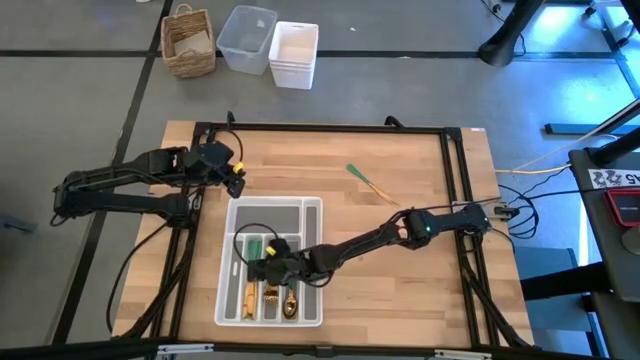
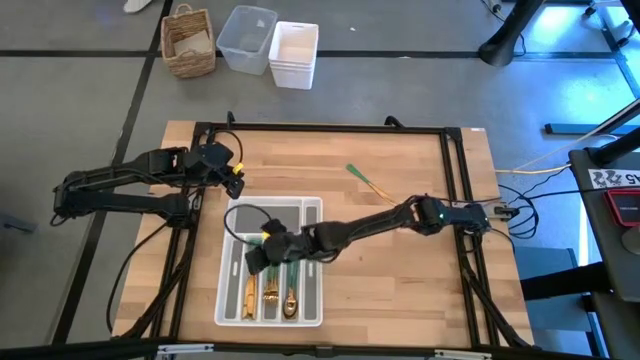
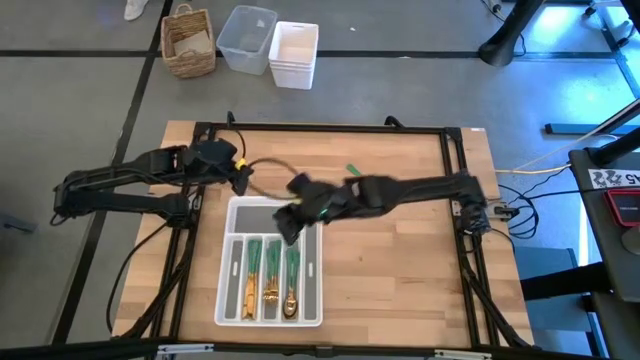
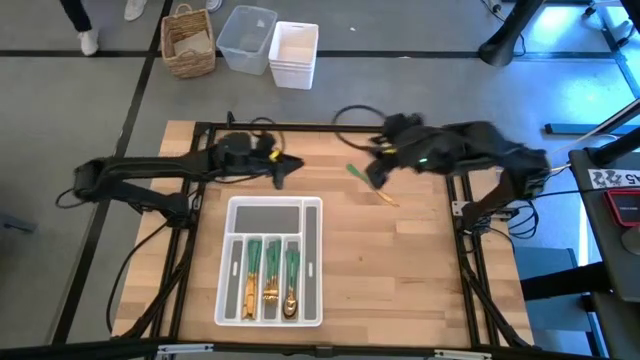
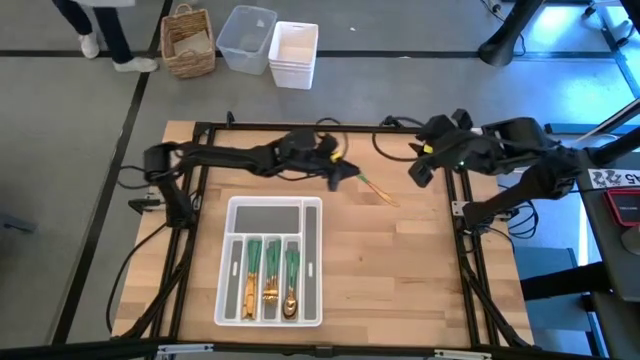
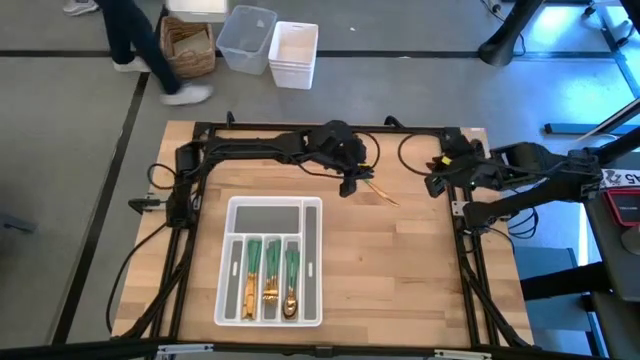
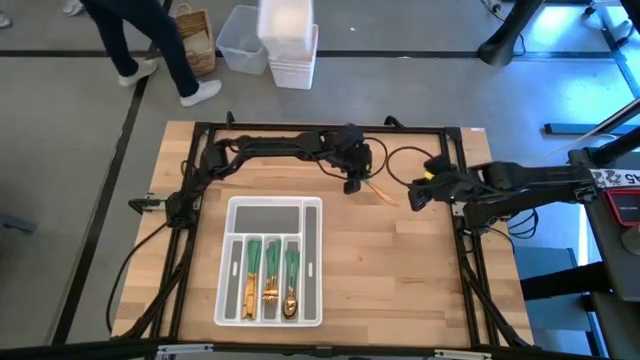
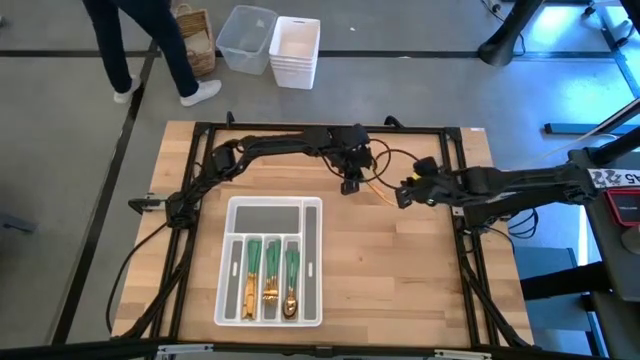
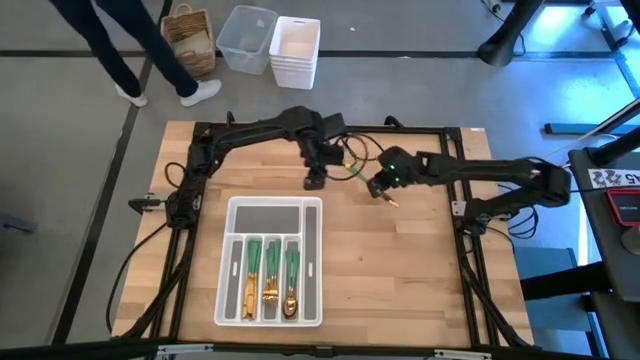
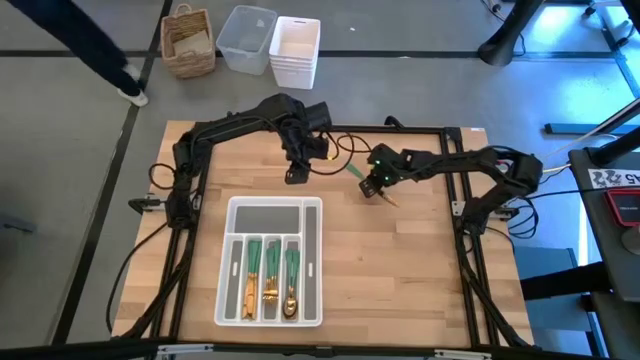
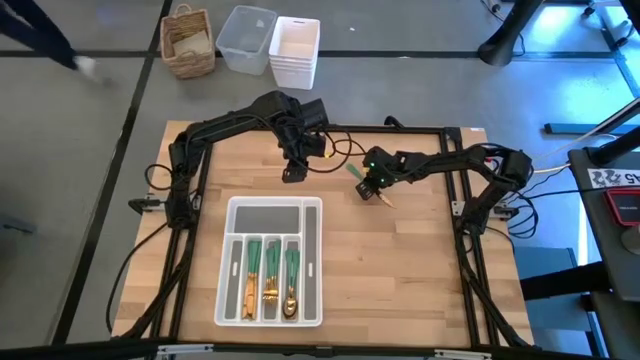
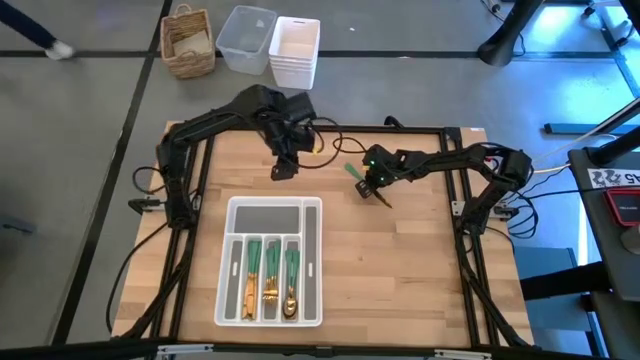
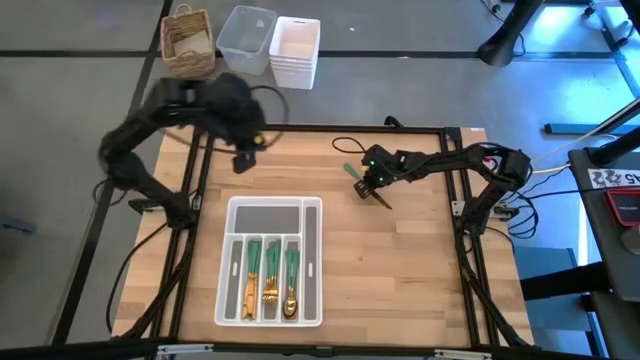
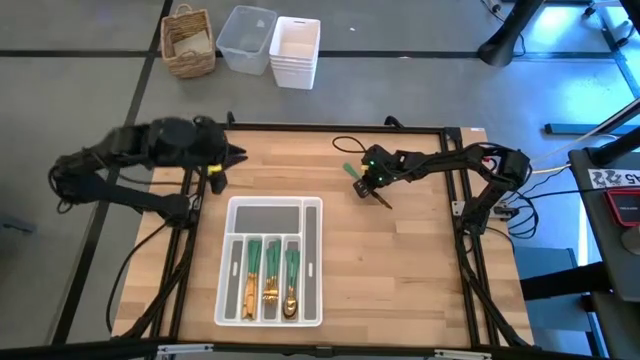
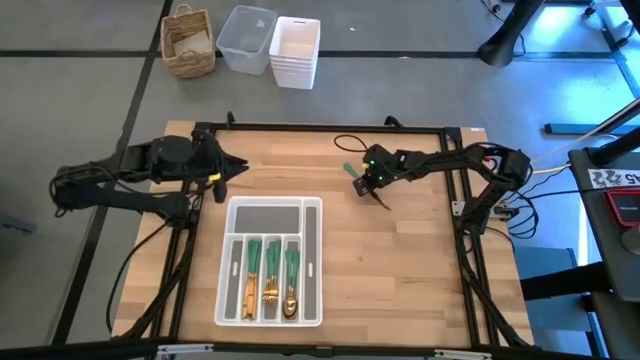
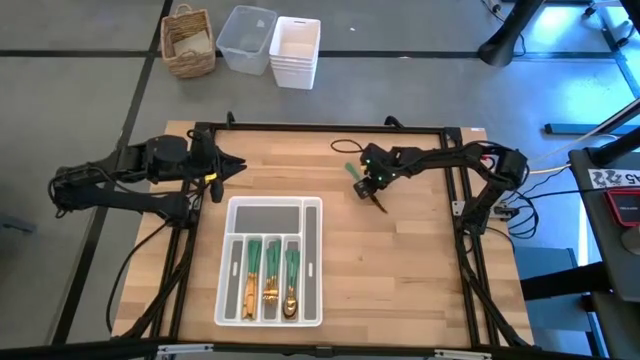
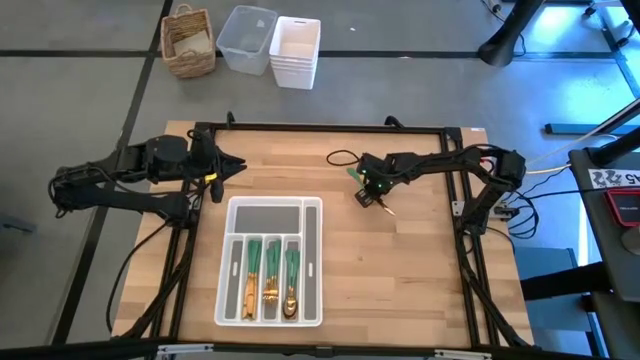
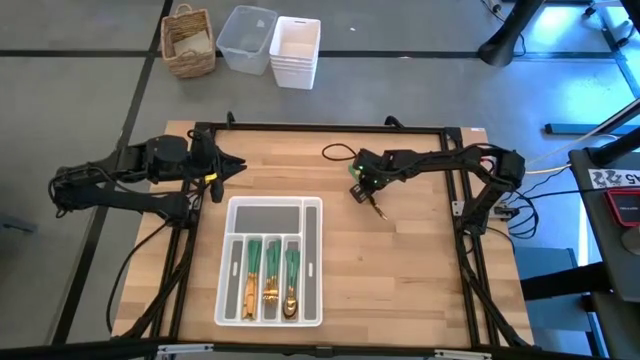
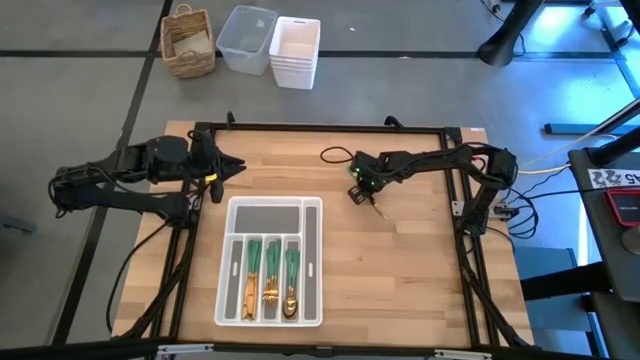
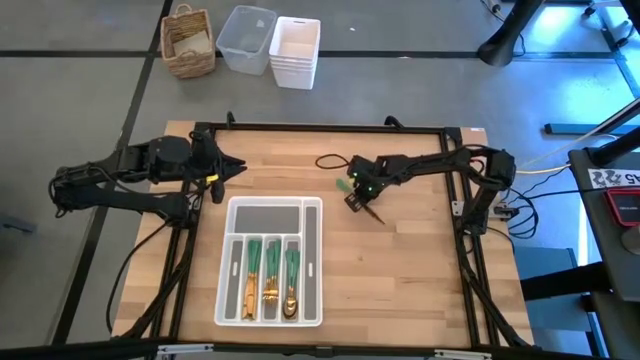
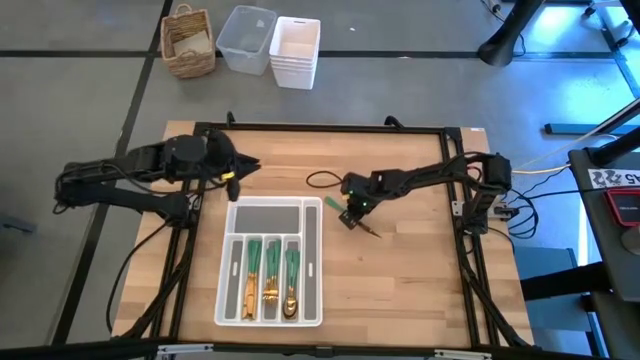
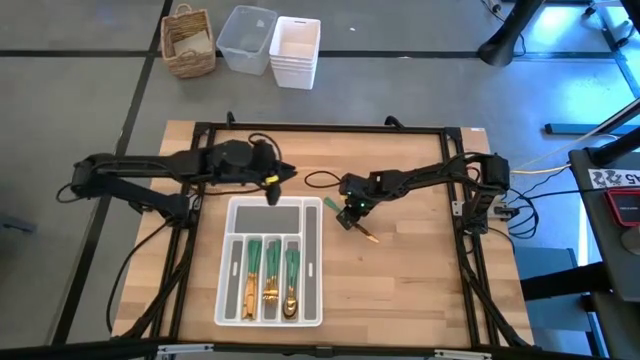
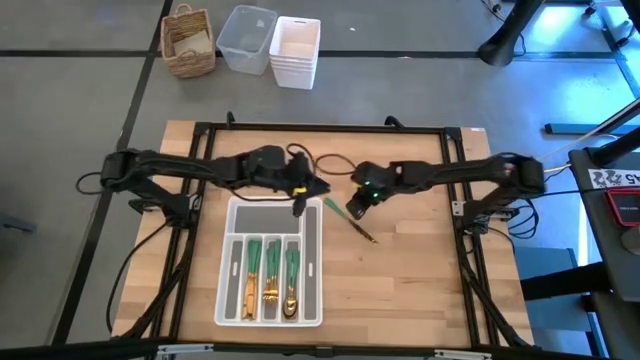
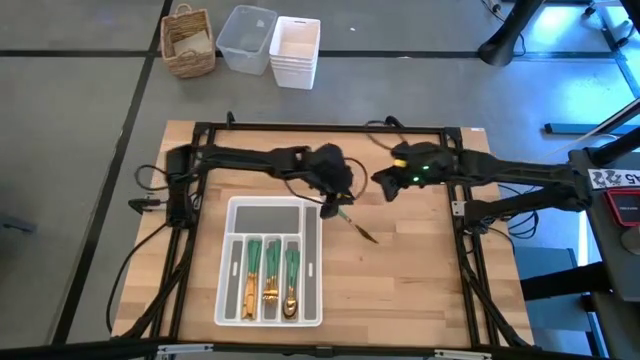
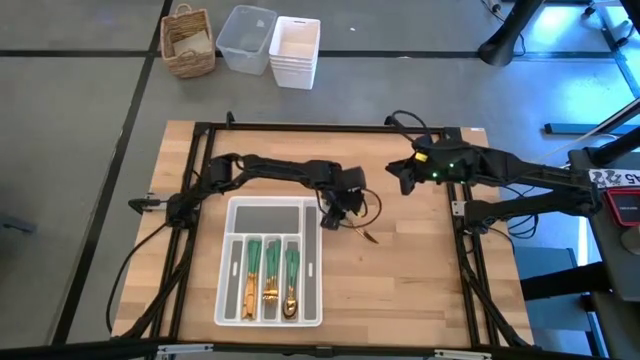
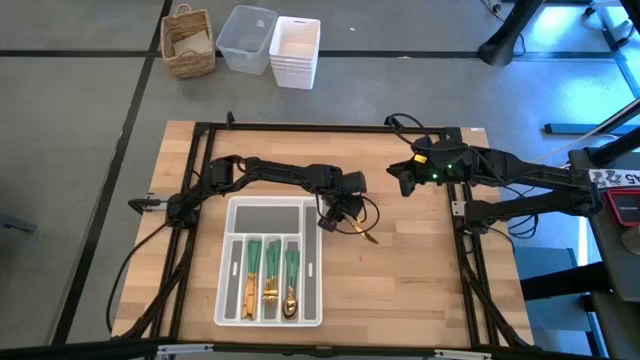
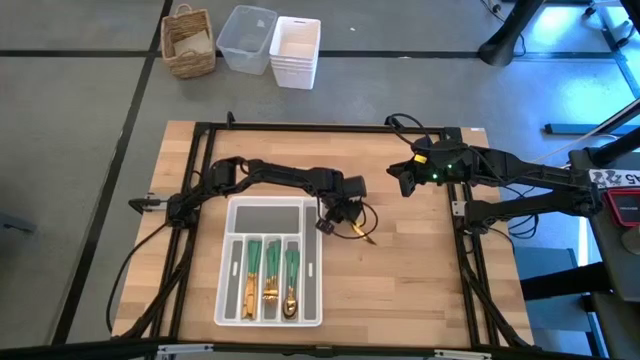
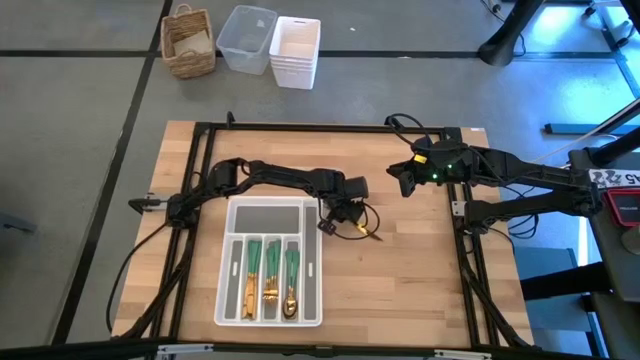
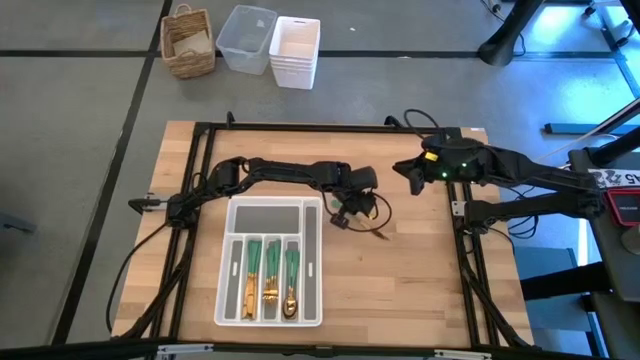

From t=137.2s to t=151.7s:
Task: Sort silverware
Put the table knife in the silverware tray

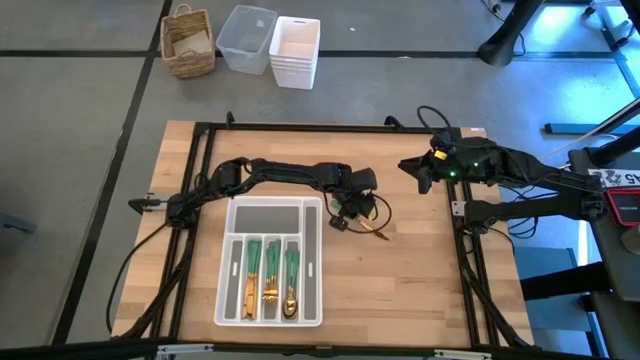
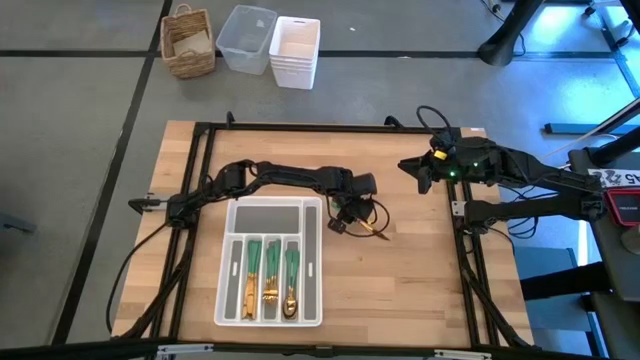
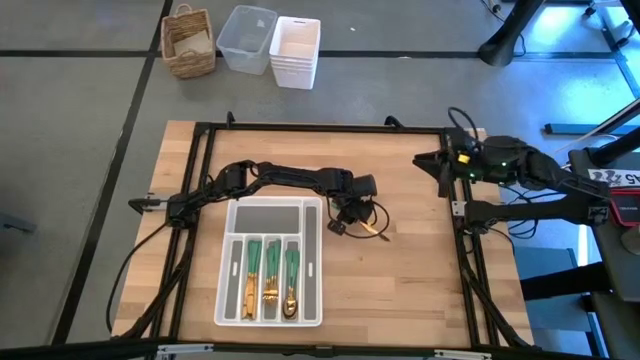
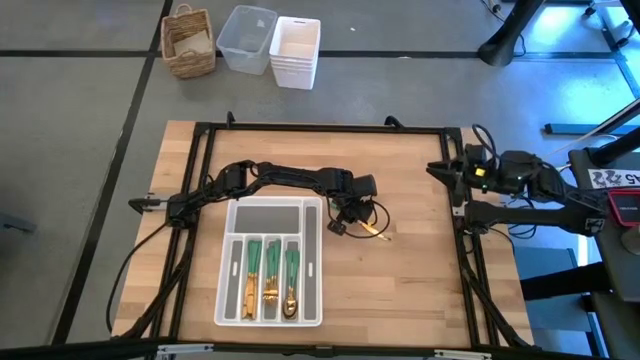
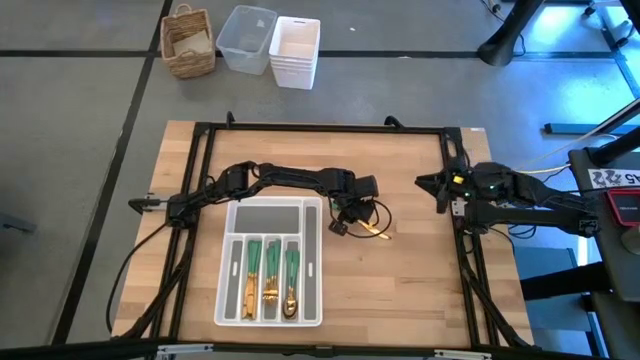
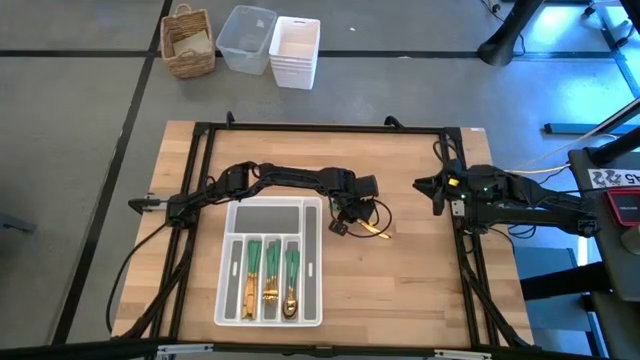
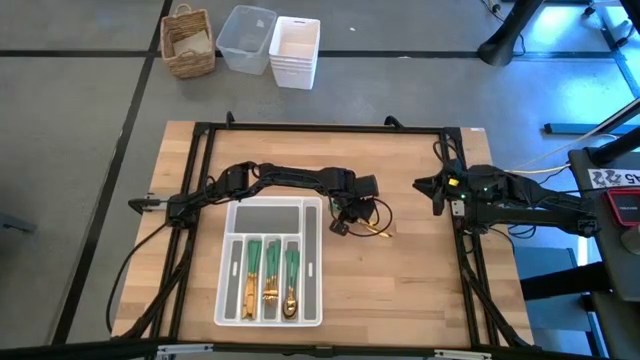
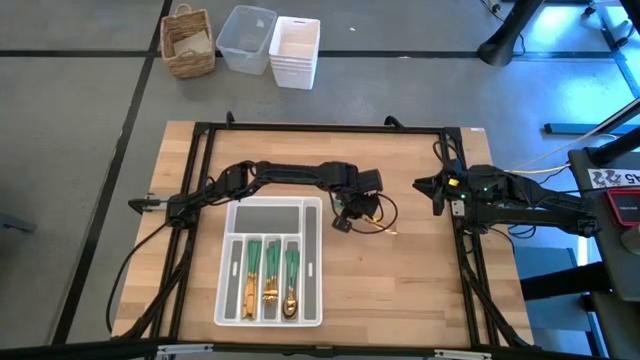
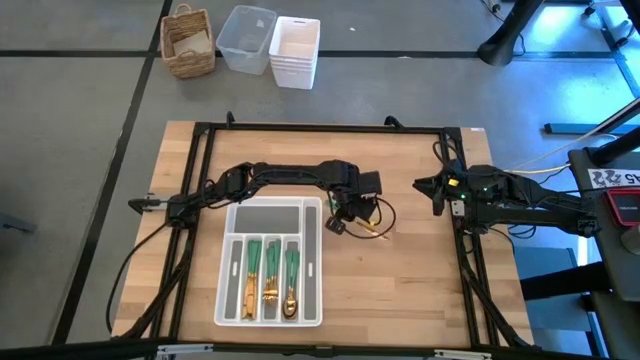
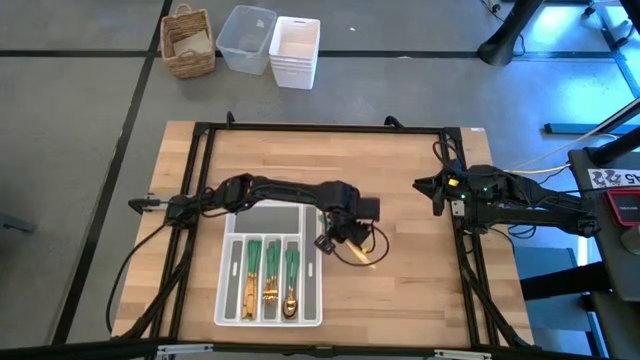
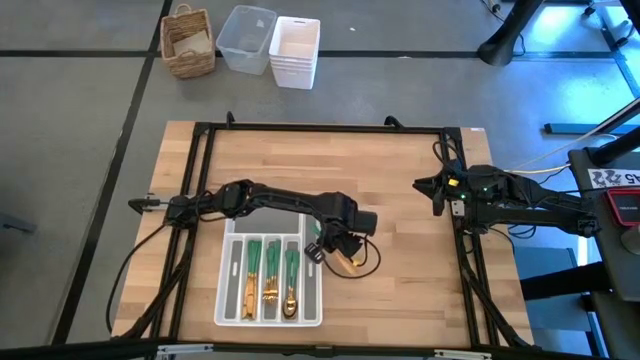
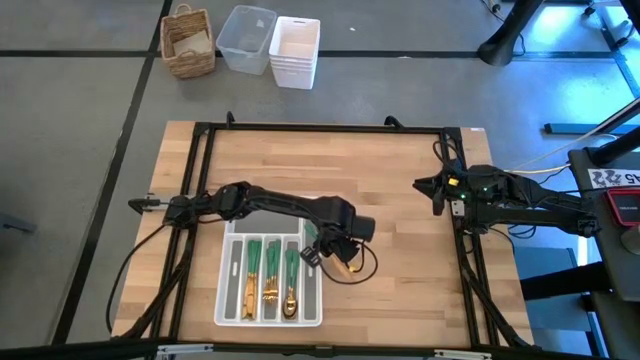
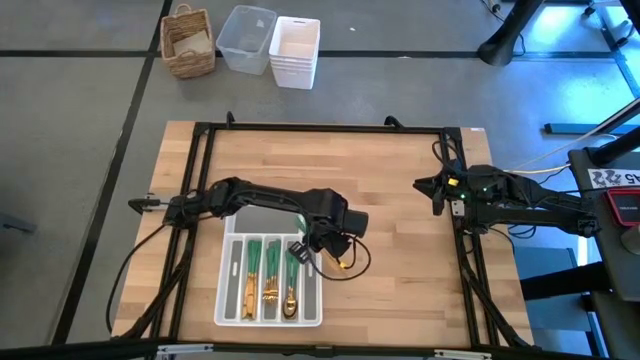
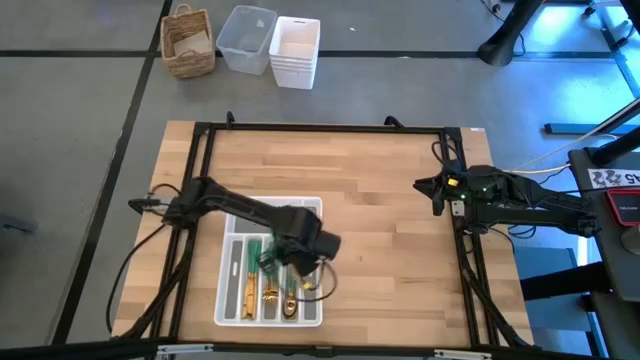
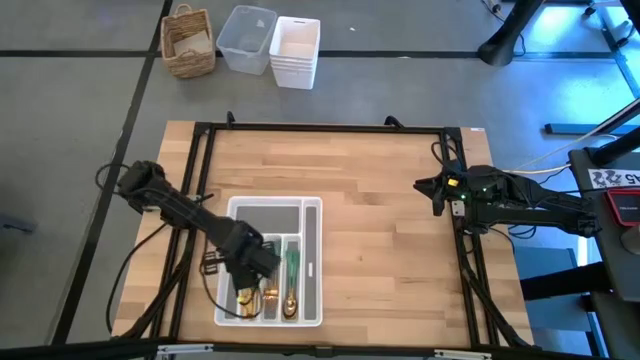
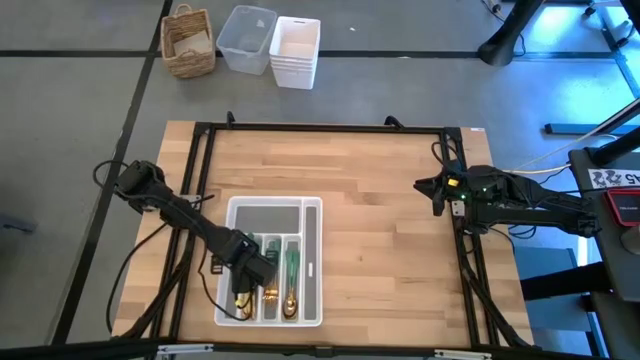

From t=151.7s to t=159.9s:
Put the table knife in the silverware tray
